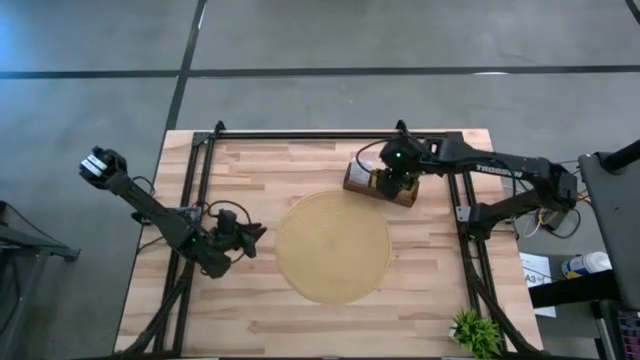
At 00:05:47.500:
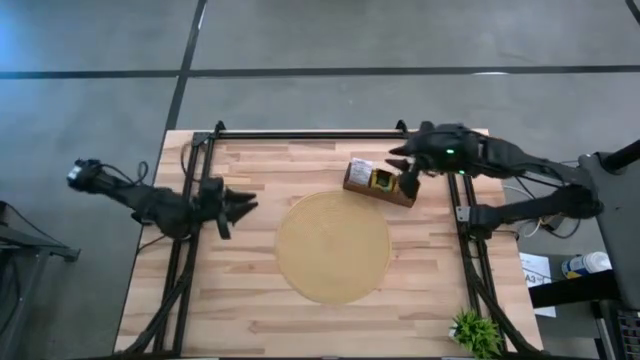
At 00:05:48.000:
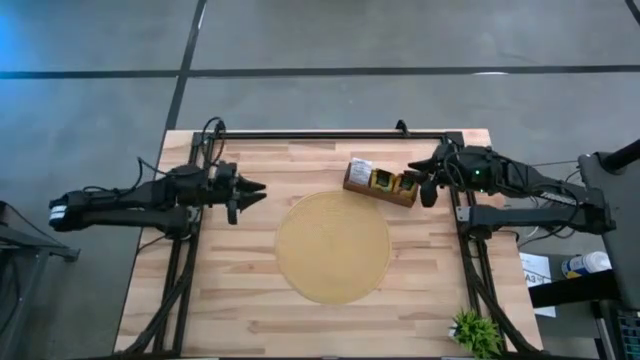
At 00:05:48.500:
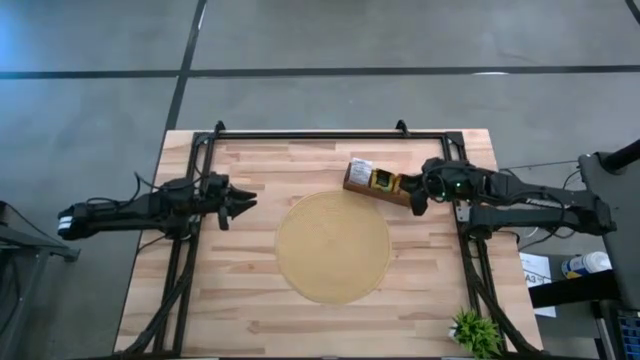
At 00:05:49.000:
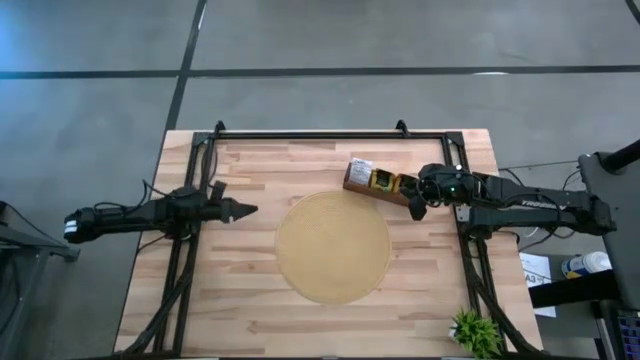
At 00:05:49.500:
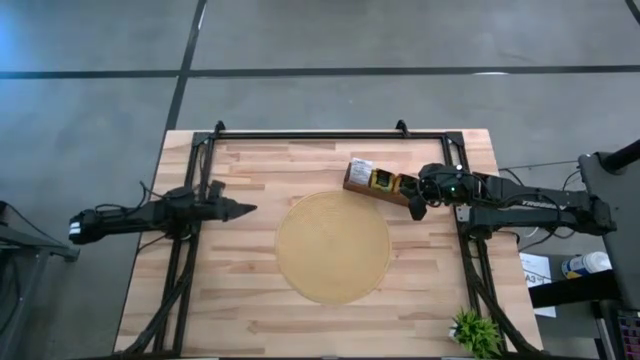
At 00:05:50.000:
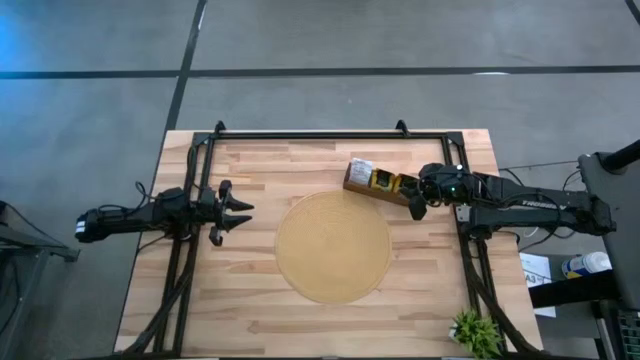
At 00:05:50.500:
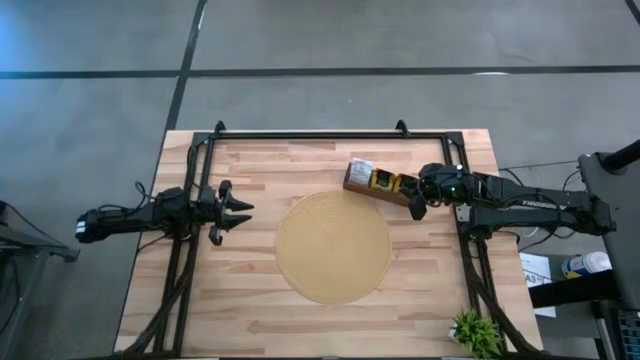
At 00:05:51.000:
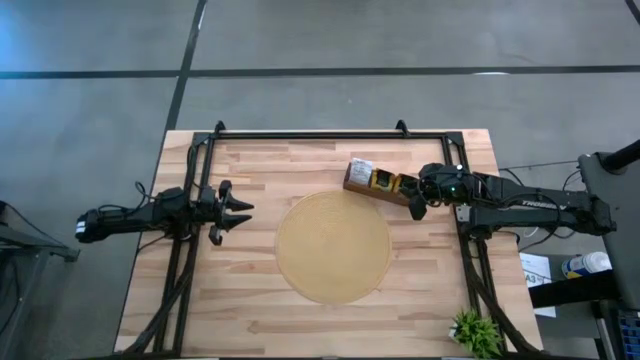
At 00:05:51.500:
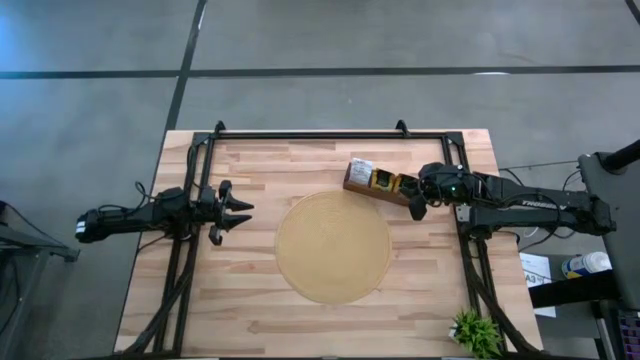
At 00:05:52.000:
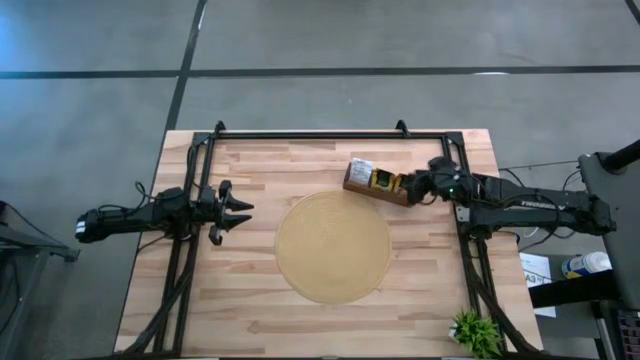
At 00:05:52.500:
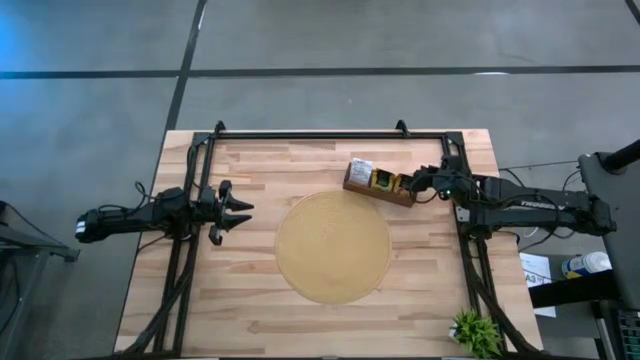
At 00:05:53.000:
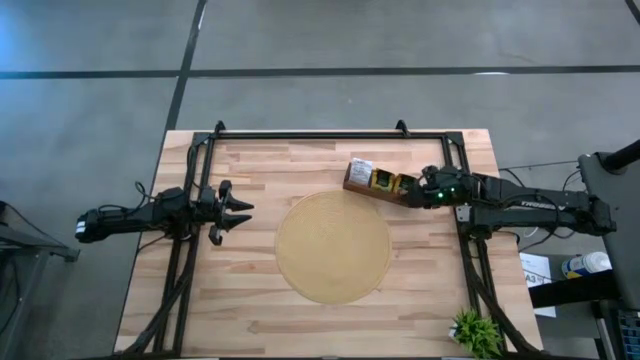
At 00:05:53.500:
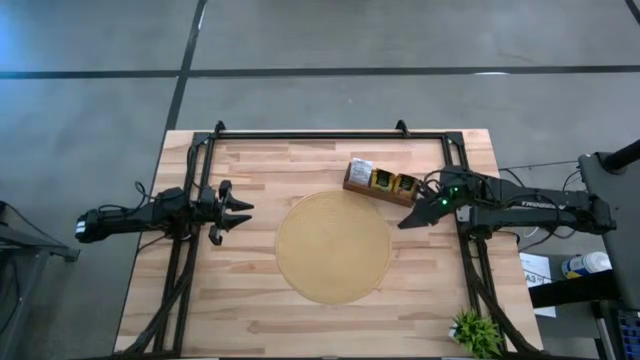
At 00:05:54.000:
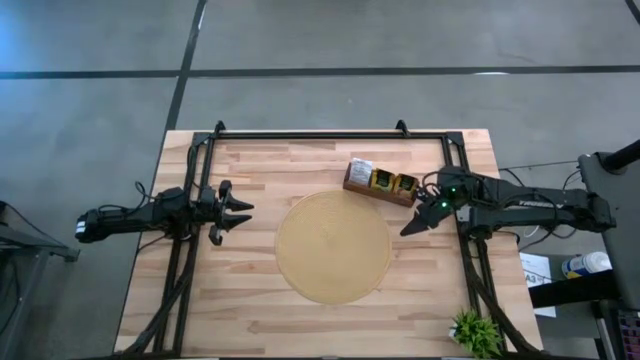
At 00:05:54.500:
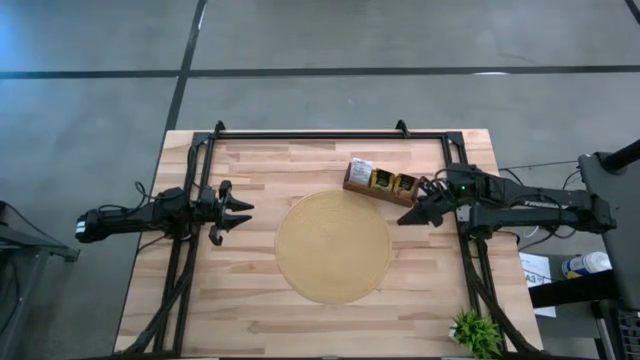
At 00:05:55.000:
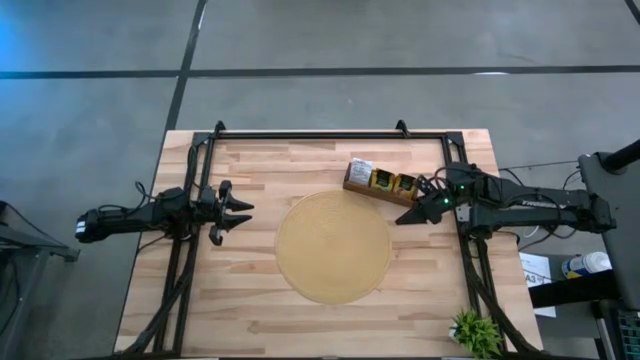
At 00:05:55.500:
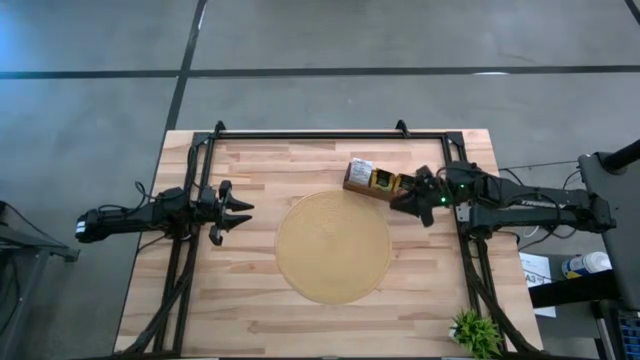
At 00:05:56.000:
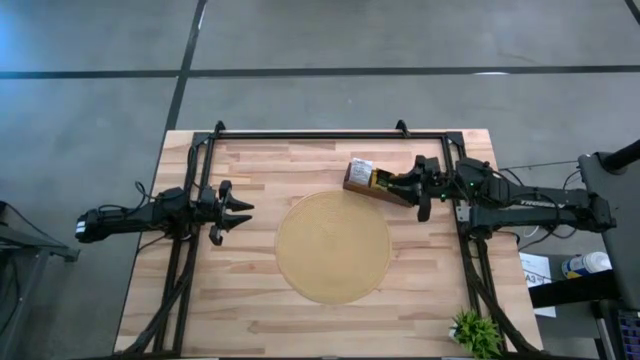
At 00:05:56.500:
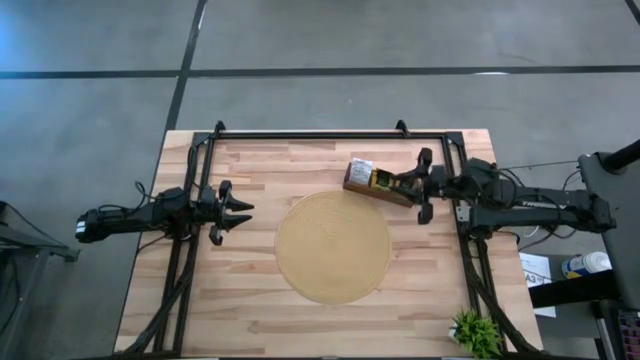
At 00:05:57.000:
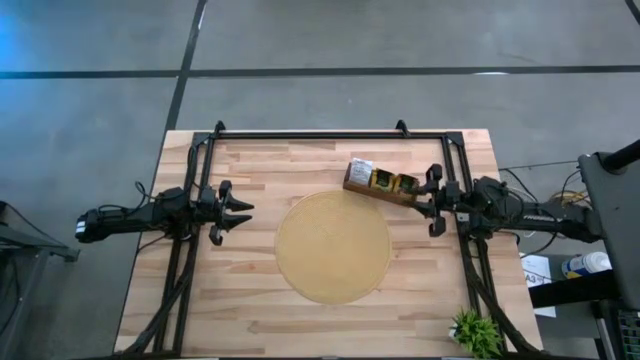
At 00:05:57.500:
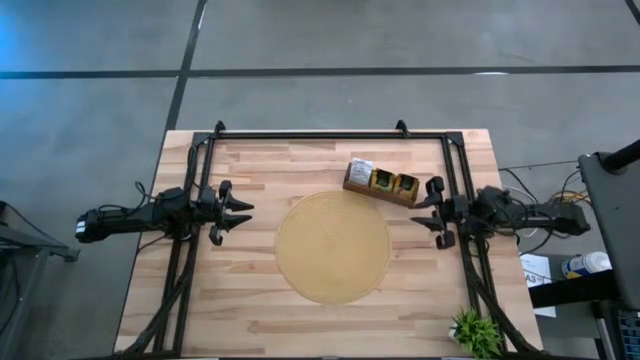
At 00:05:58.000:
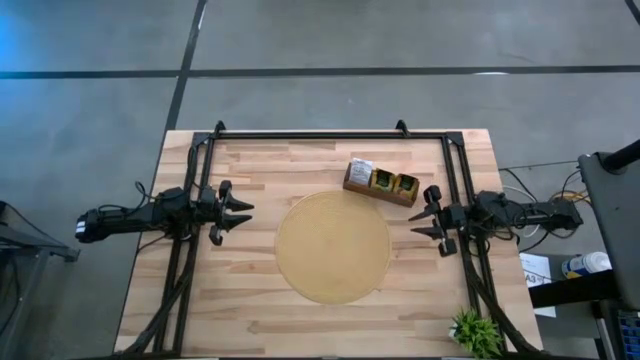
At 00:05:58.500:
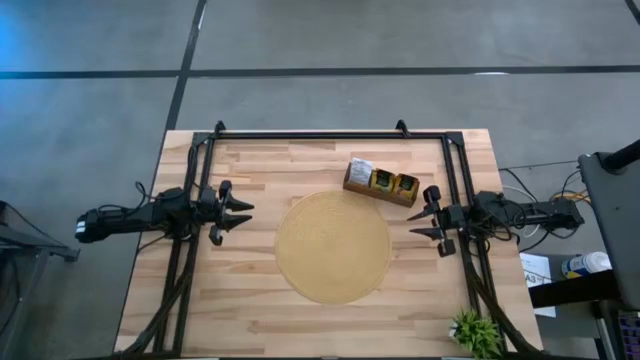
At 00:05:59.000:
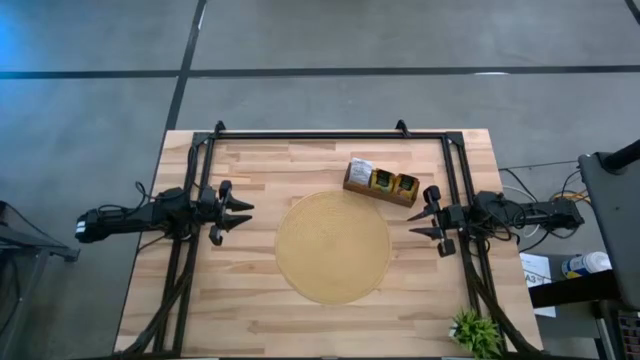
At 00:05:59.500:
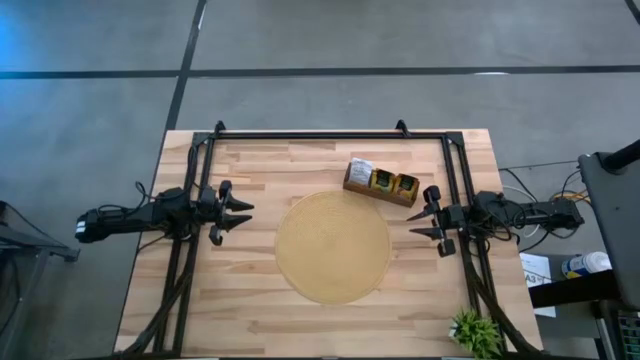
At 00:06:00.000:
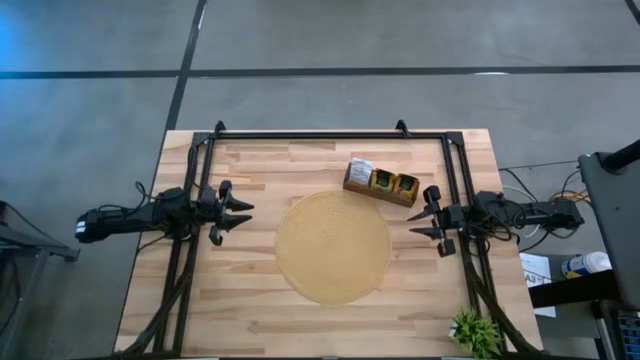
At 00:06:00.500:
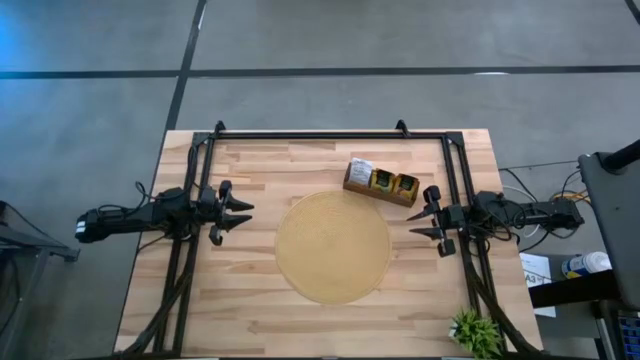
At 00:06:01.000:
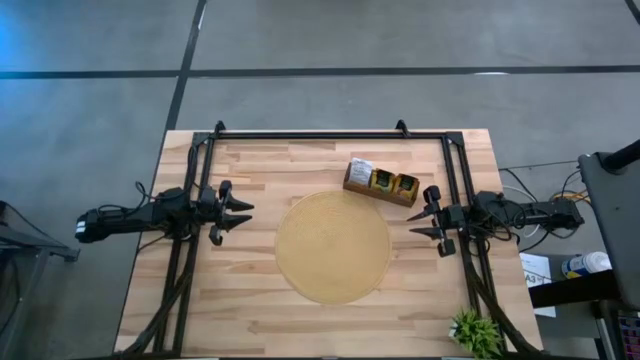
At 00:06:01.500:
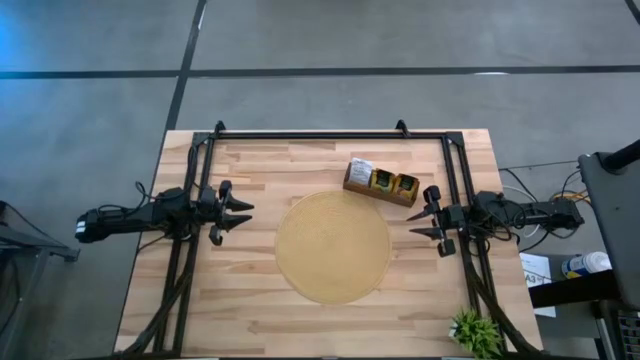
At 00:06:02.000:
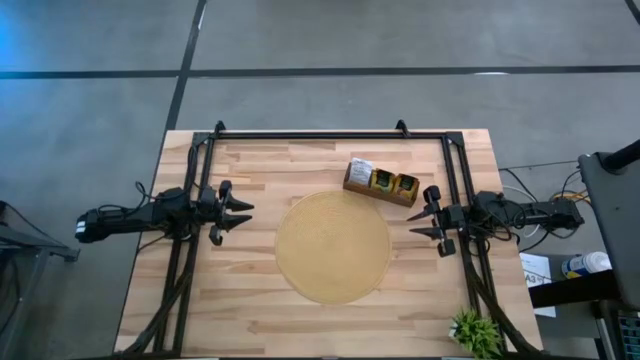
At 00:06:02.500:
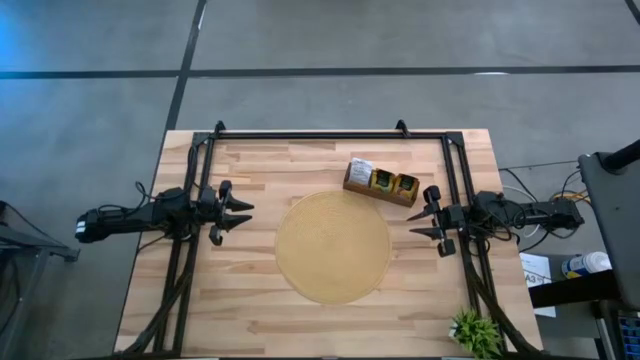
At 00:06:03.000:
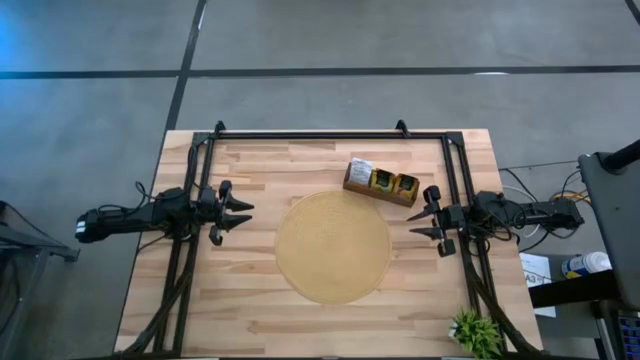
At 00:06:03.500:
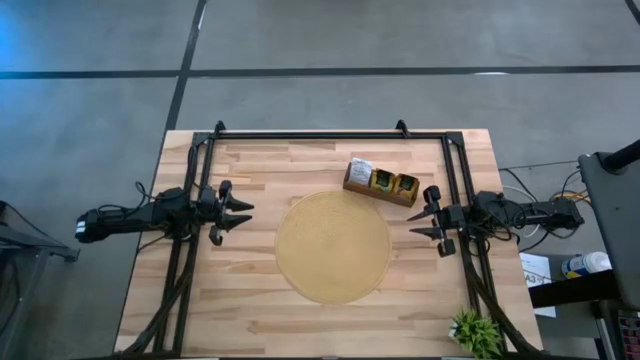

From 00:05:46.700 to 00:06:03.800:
Task: Pick & Place Tea
Return to Home Position
